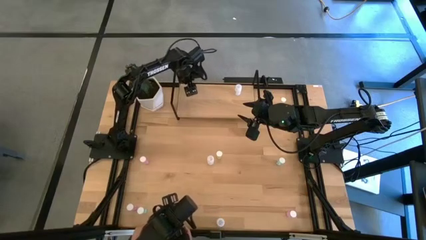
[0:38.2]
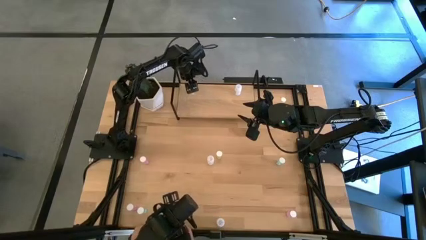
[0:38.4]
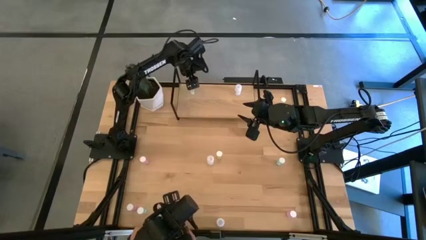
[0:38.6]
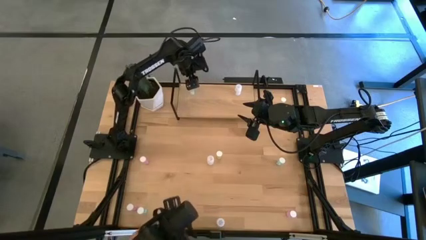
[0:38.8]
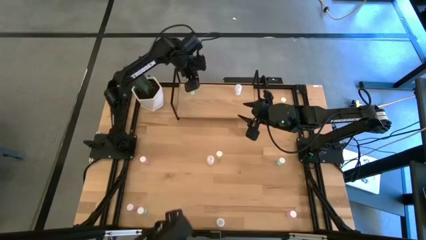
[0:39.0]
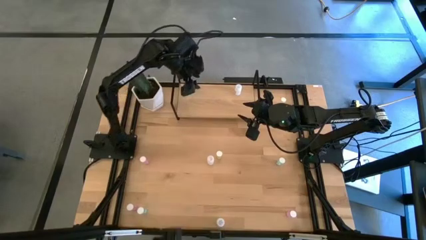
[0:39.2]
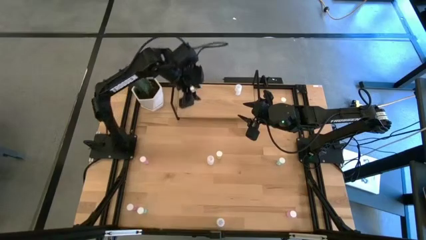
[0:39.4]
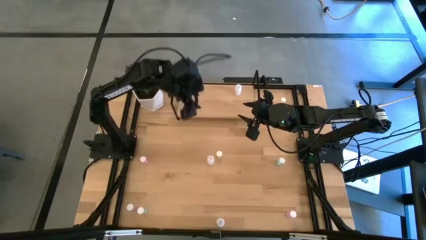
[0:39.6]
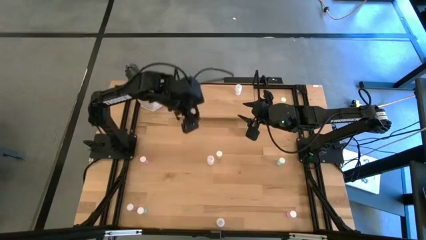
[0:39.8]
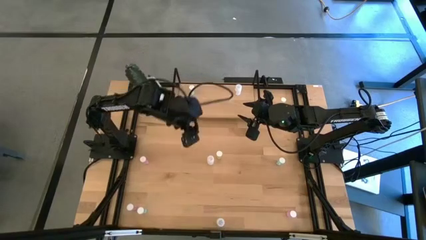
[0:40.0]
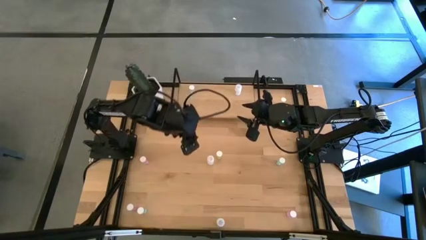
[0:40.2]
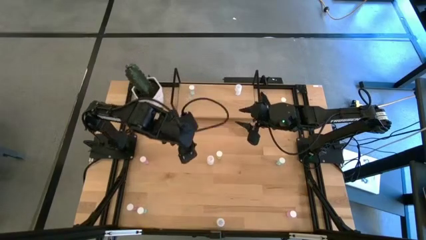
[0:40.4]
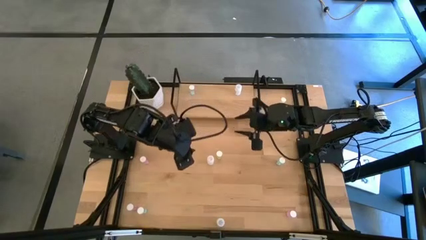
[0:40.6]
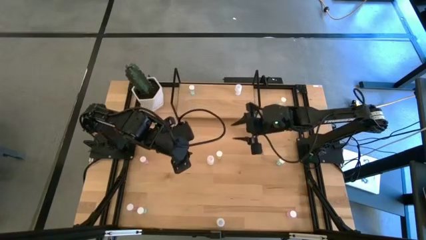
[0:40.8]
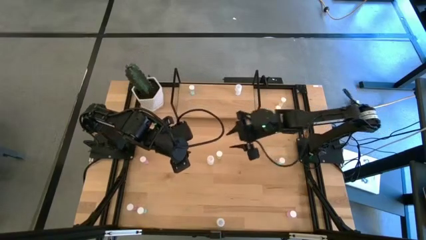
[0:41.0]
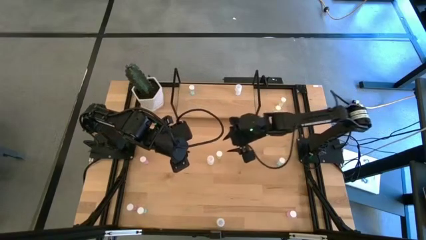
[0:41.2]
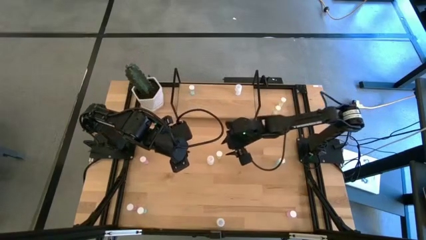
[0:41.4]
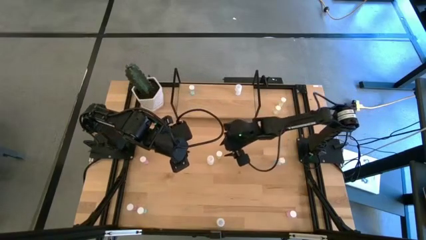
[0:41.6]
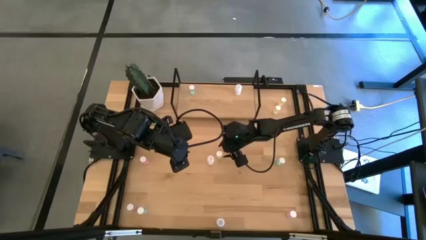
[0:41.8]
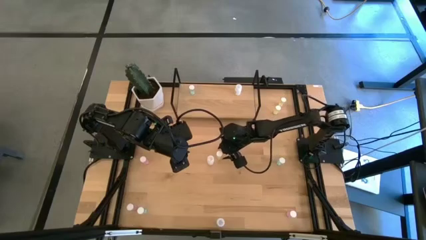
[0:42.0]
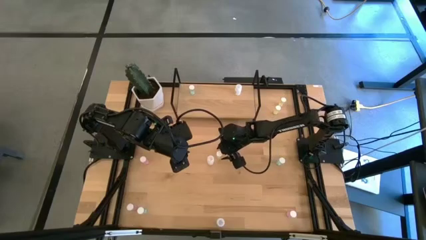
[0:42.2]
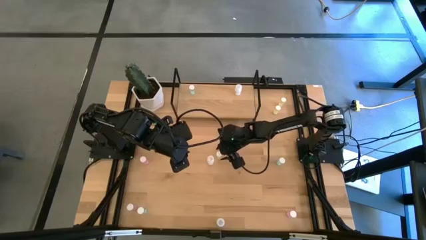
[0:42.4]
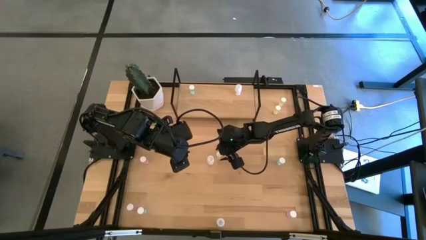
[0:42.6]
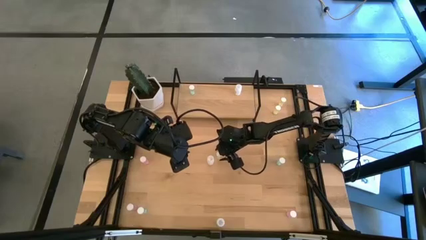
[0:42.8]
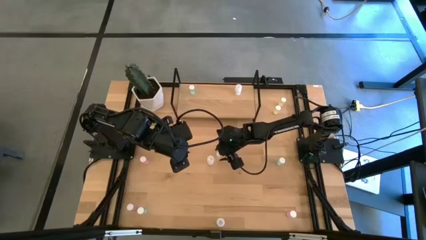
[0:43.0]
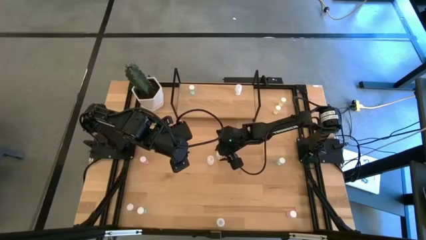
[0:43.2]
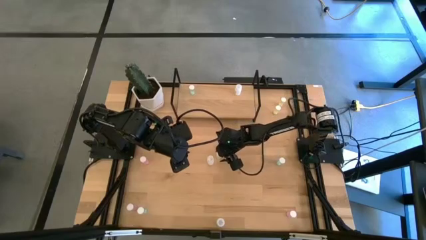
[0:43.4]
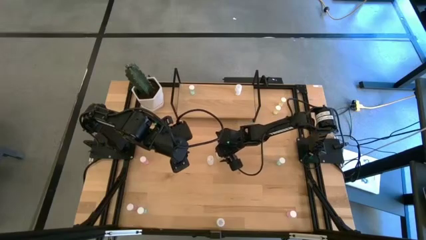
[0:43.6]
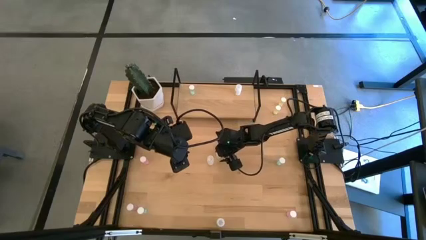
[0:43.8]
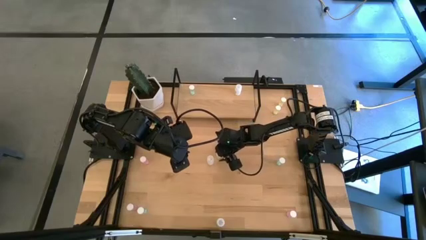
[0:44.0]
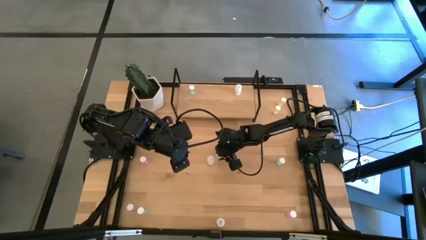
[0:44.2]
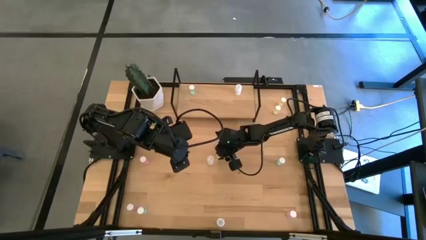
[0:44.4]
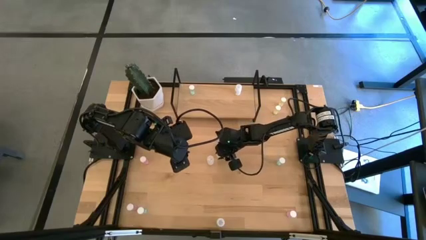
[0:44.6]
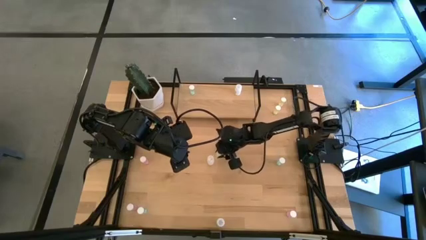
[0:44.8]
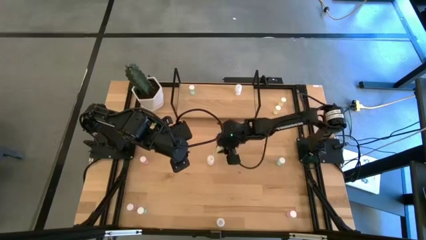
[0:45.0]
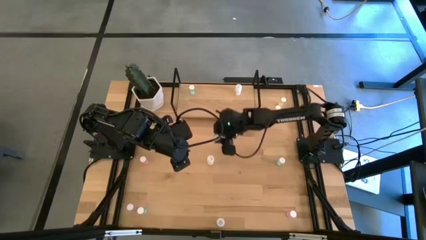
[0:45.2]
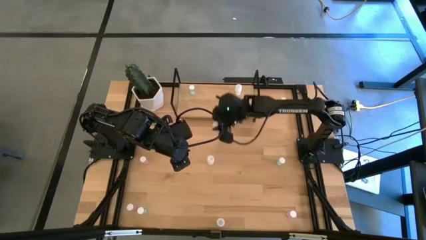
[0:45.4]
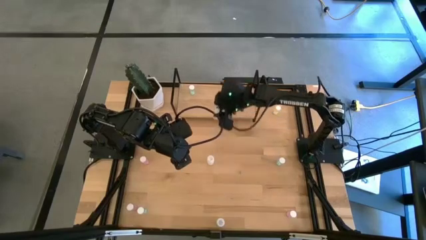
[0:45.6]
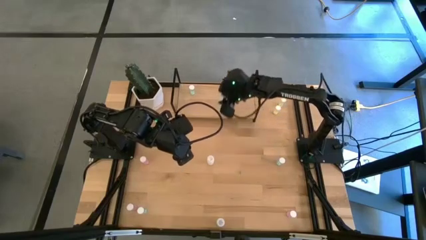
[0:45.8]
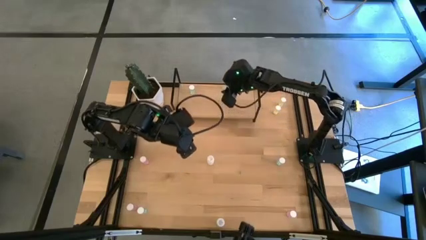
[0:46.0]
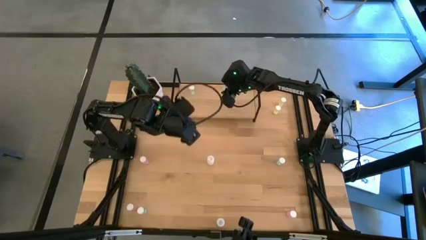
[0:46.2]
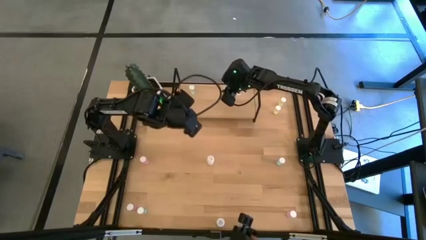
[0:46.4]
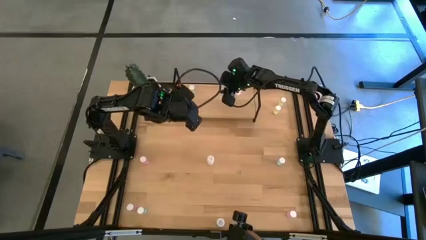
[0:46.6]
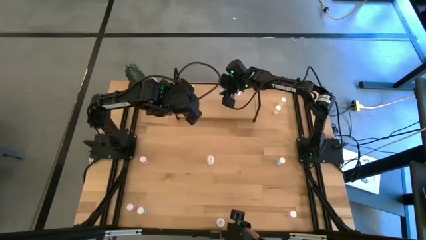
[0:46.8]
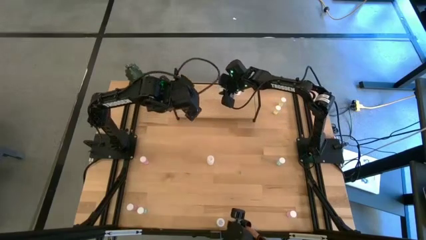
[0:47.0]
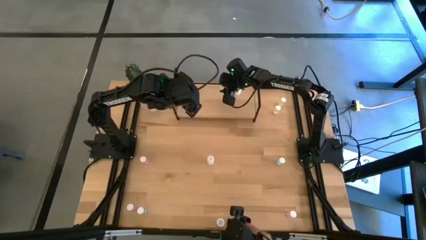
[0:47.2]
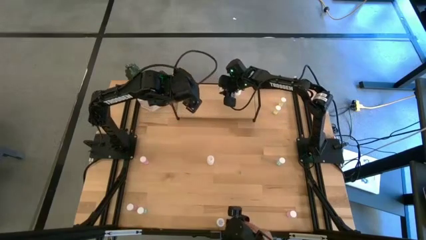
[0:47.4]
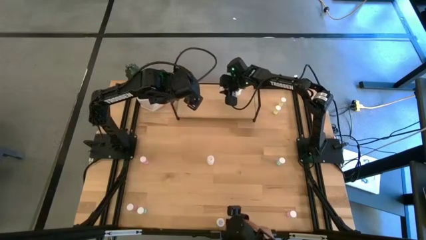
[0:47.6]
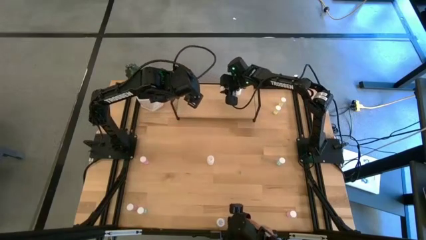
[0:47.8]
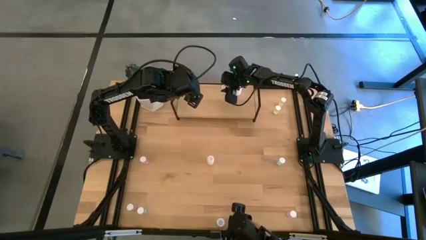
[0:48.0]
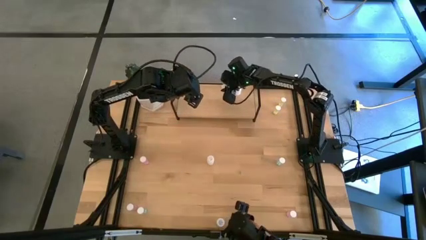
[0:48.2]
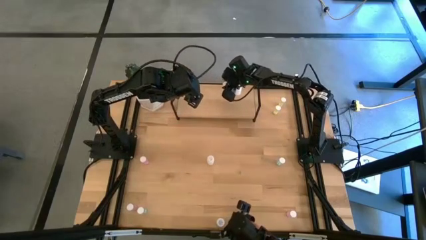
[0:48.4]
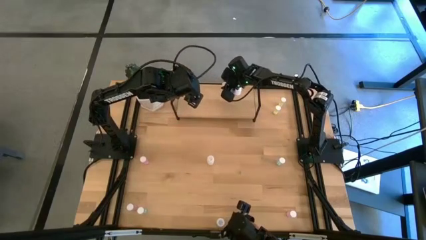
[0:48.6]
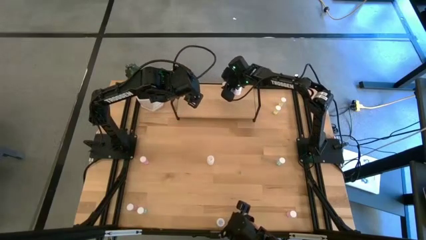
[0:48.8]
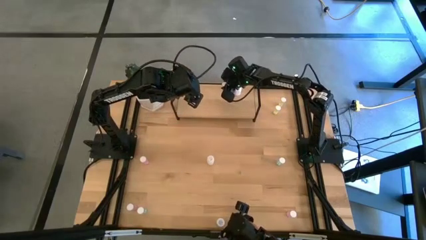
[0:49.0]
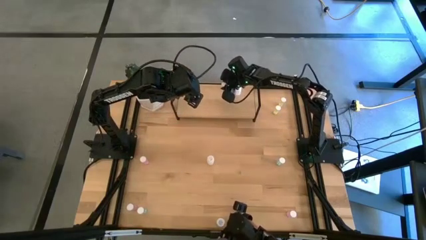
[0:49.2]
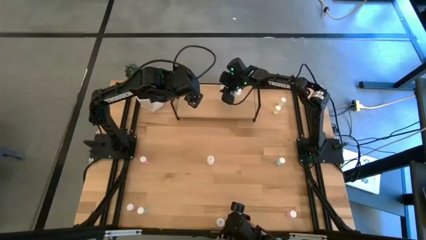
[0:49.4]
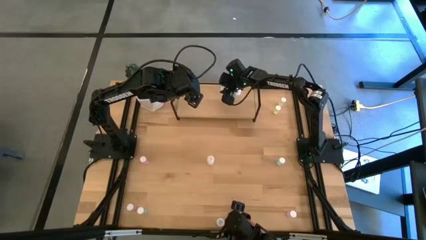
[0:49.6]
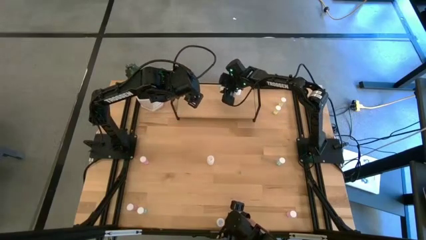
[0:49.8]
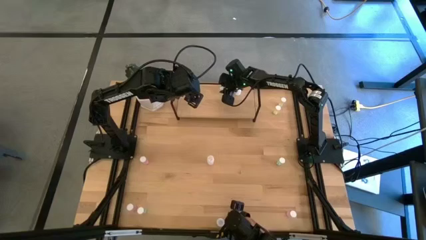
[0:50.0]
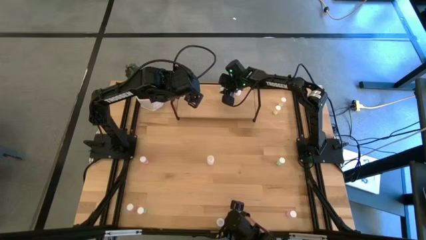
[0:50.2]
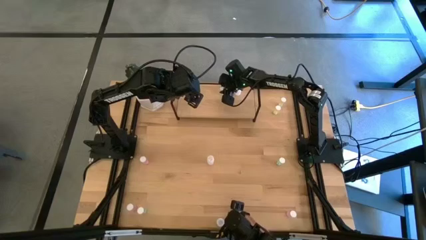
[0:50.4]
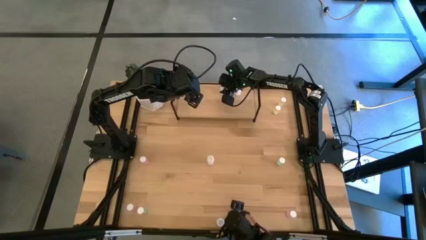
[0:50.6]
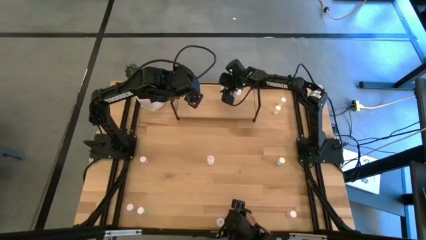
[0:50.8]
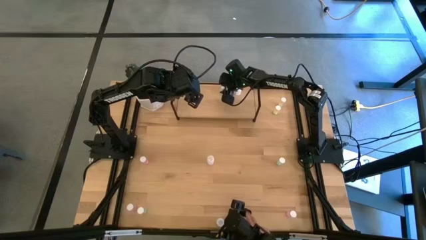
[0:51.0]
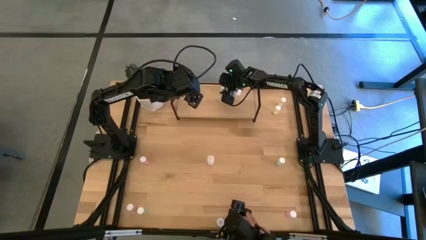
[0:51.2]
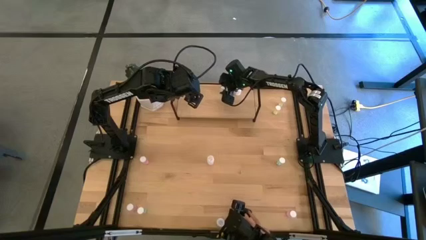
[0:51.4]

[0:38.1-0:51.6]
Task: Pick and place medicine bottles onto shelf by color
Put the center yellow pill bottle on the shelf
